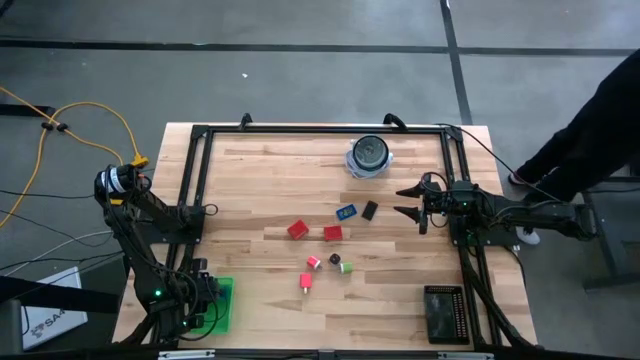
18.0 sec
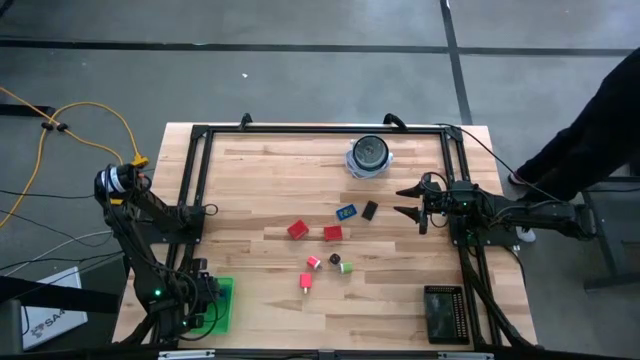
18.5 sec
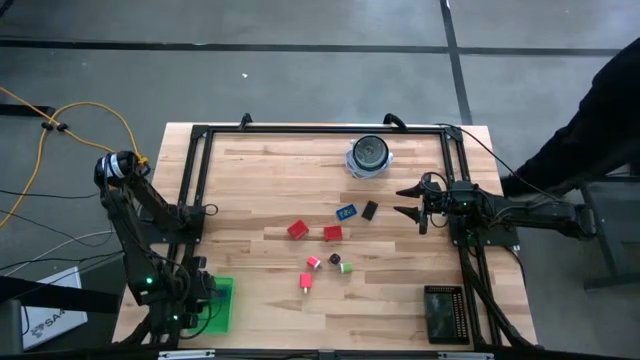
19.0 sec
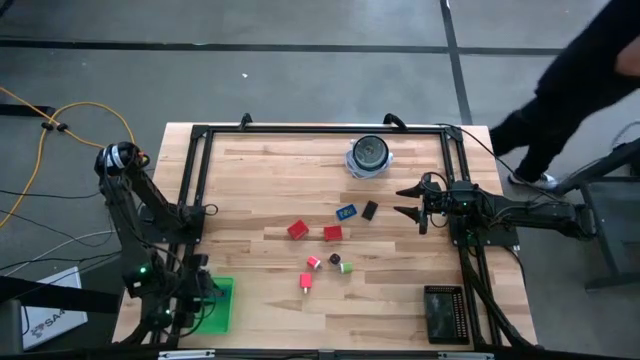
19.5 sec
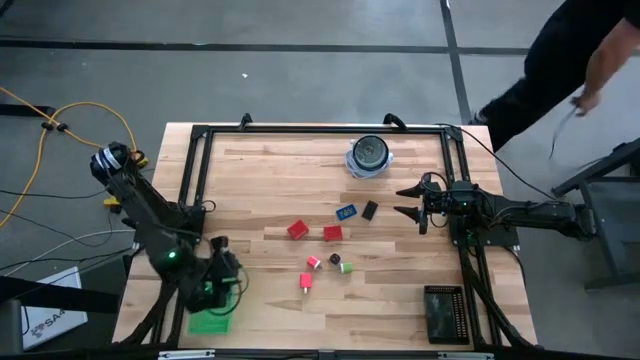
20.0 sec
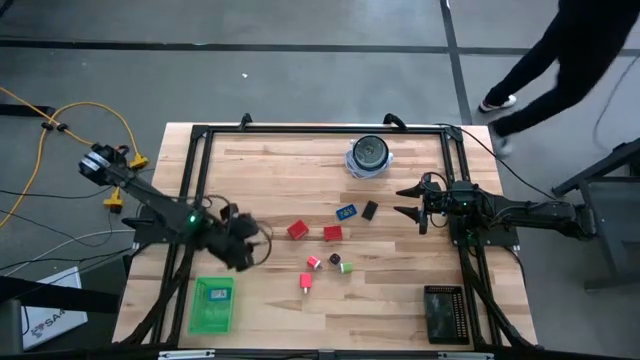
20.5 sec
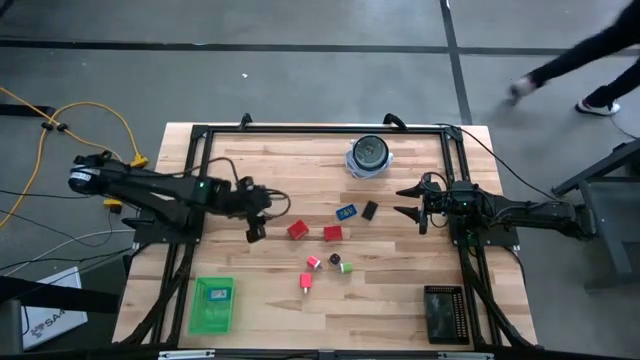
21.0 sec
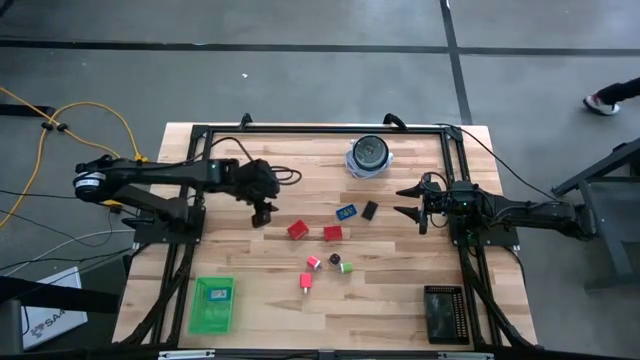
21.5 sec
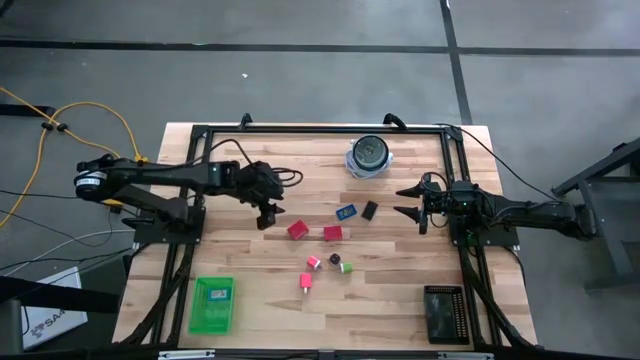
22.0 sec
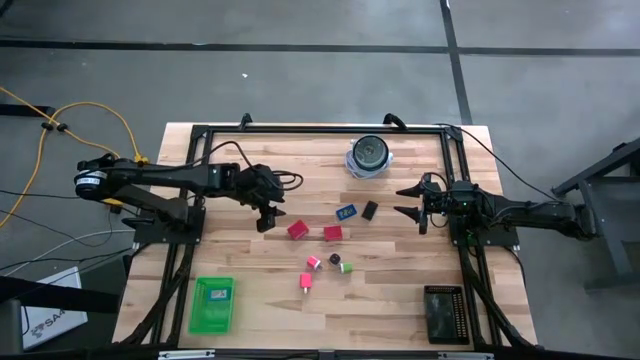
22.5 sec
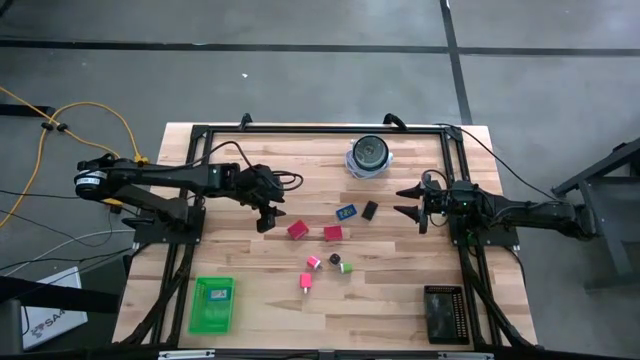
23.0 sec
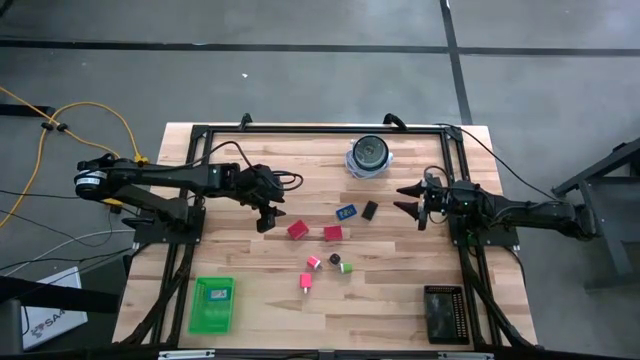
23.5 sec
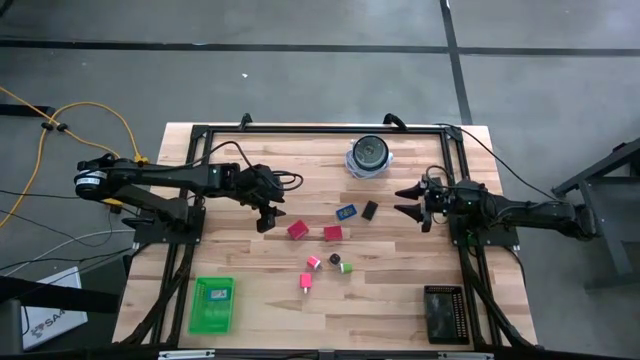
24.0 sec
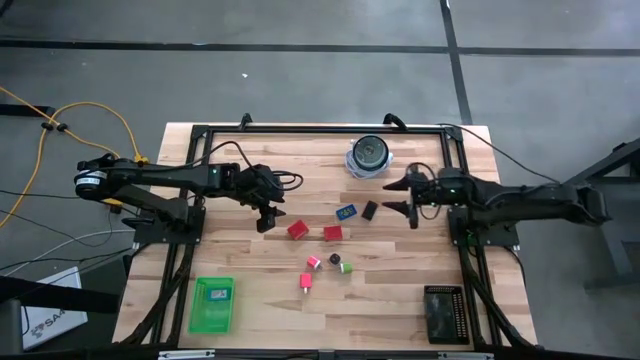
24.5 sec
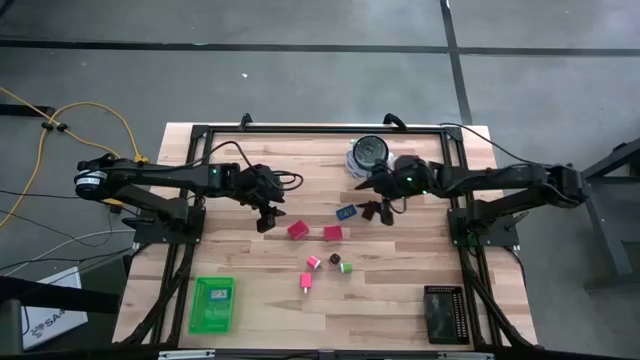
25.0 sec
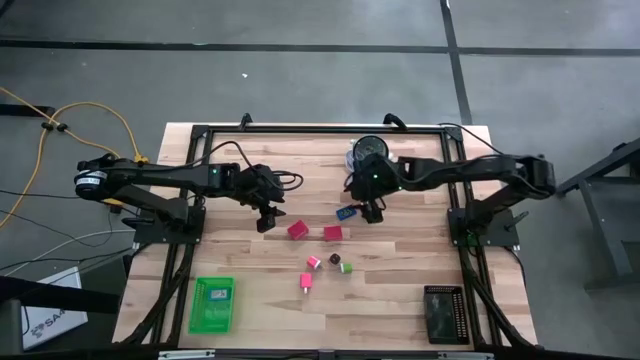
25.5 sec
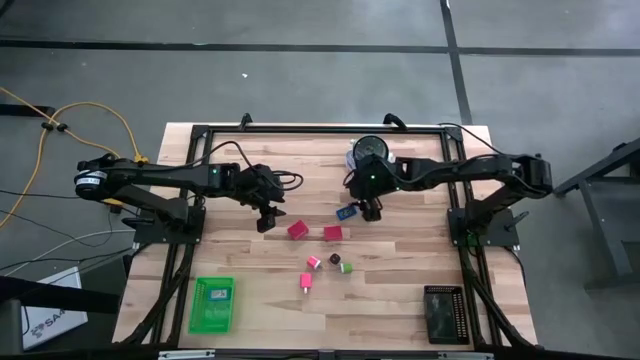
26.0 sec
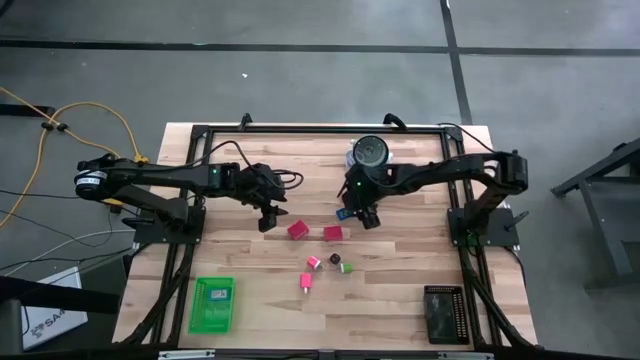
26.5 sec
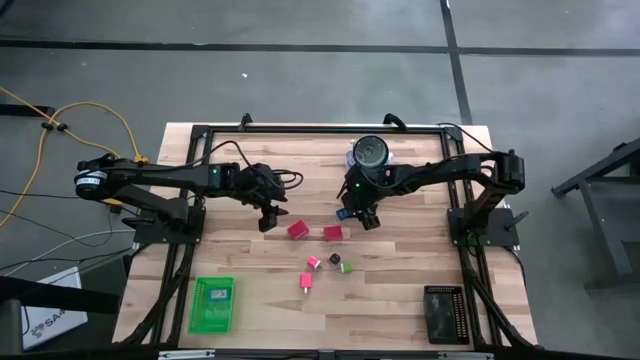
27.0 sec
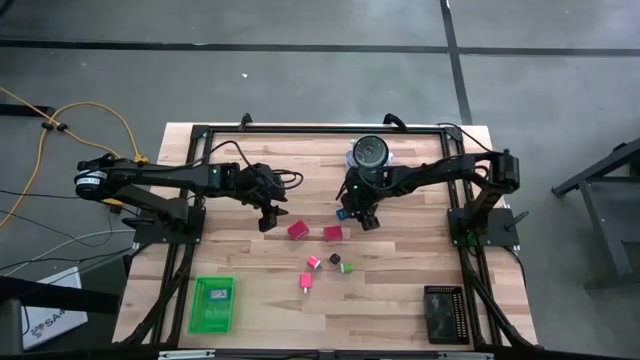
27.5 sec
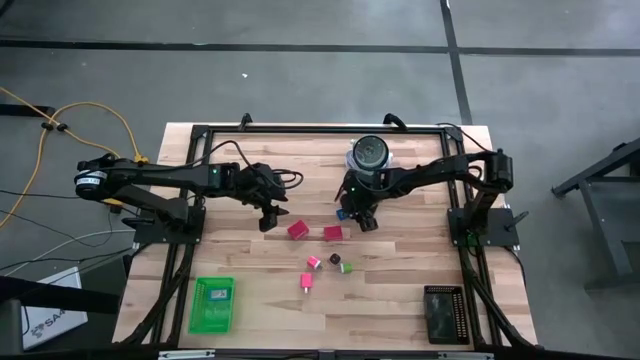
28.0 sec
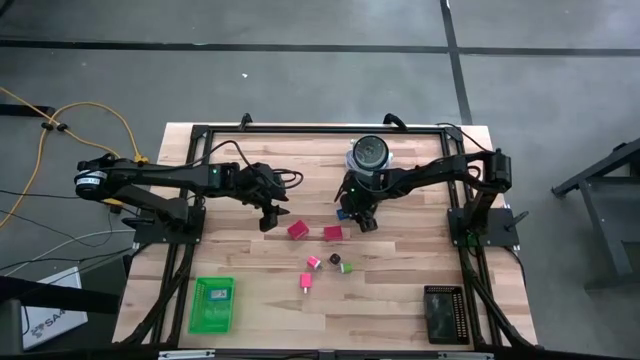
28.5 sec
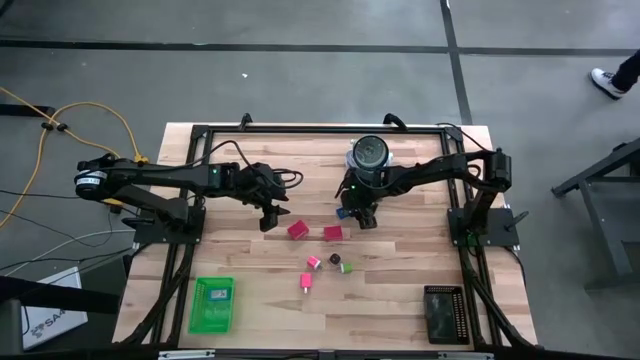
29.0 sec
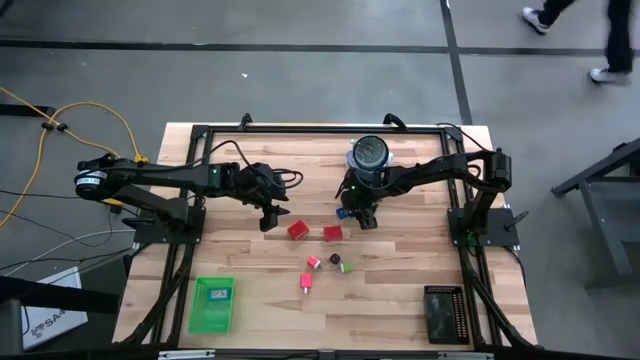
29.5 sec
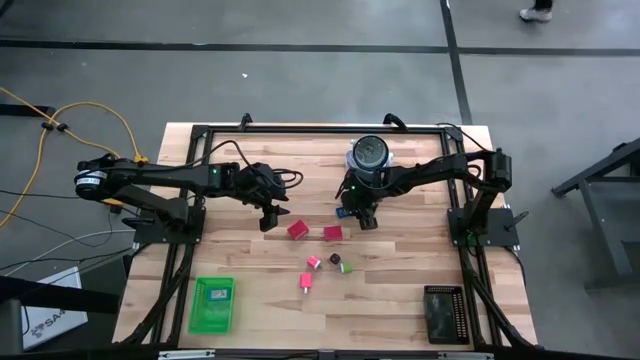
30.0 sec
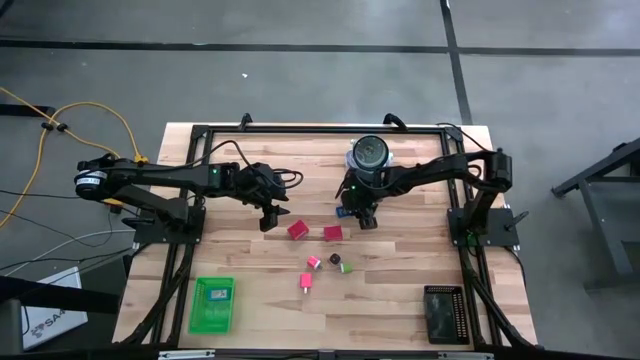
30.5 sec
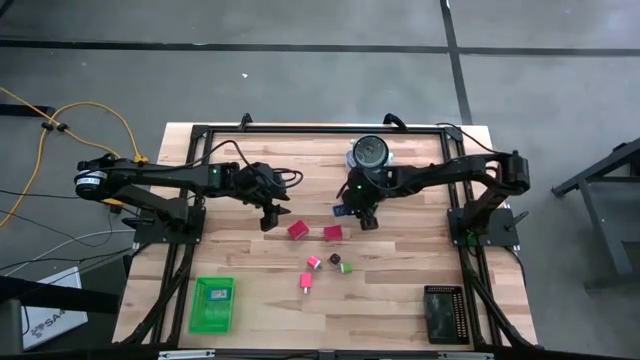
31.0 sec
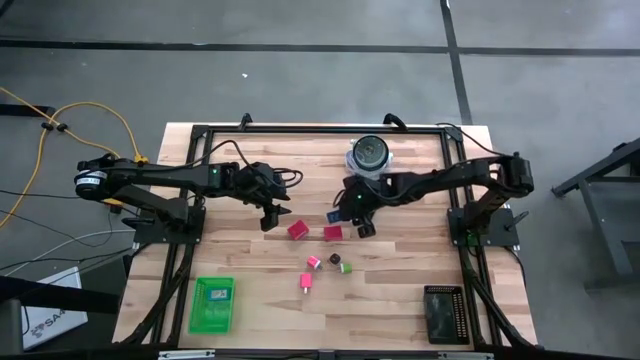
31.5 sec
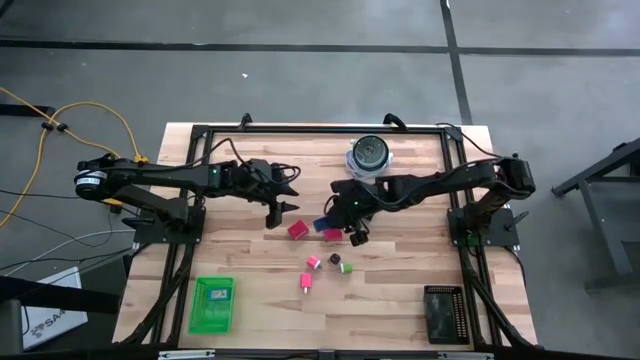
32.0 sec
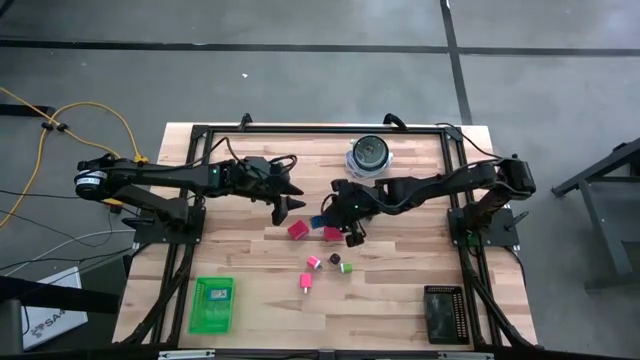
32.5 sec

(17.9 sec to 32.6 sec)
Task: Pick & Place Office items
Put the blue digital timer into the green bin
